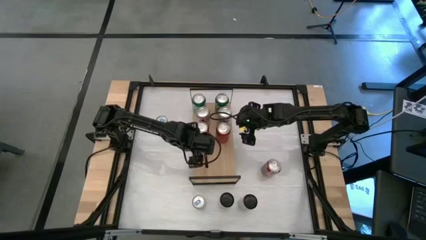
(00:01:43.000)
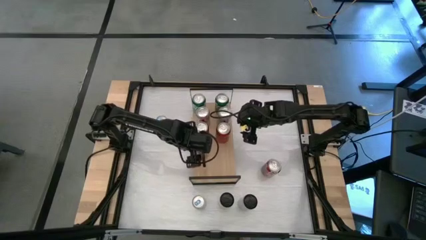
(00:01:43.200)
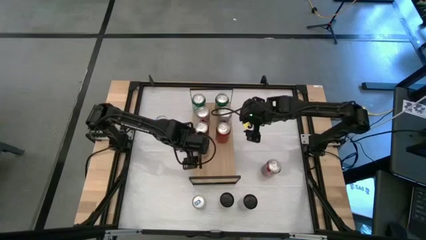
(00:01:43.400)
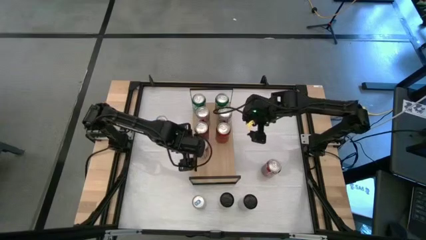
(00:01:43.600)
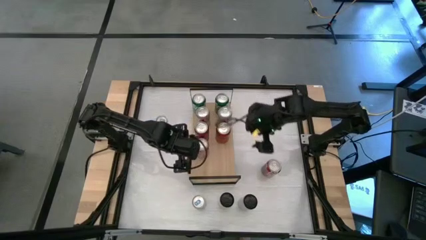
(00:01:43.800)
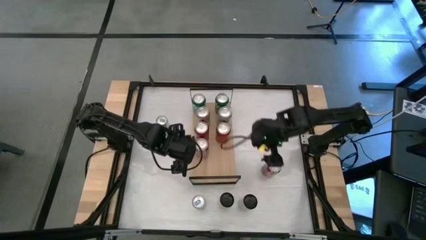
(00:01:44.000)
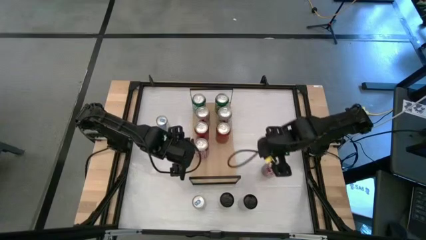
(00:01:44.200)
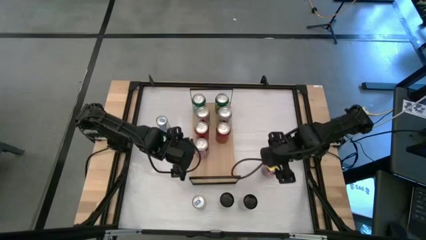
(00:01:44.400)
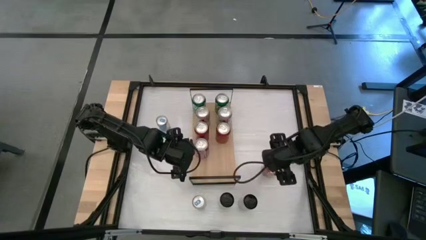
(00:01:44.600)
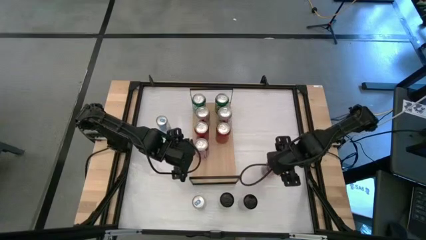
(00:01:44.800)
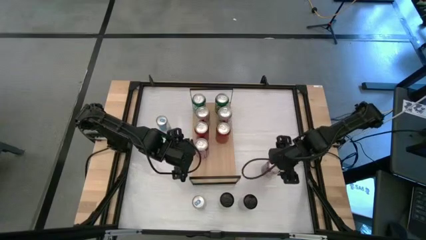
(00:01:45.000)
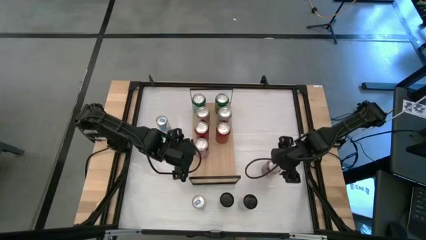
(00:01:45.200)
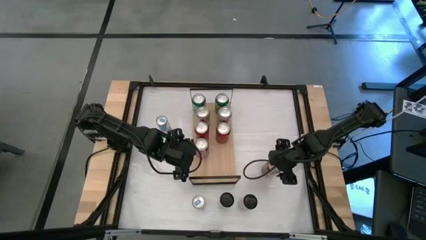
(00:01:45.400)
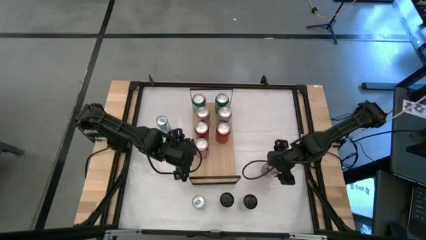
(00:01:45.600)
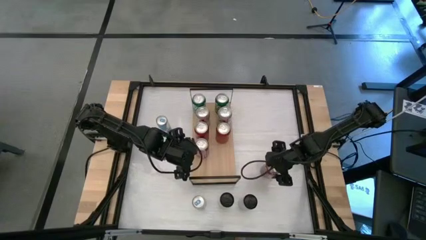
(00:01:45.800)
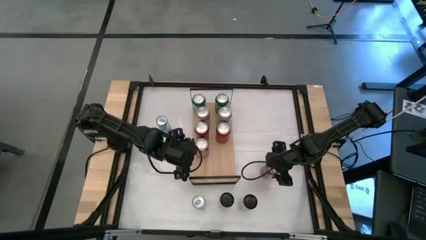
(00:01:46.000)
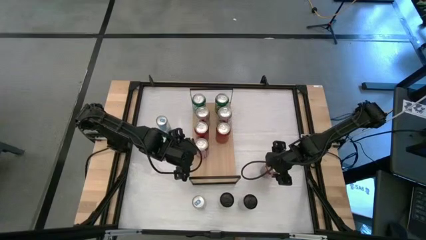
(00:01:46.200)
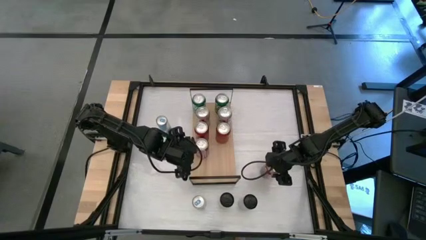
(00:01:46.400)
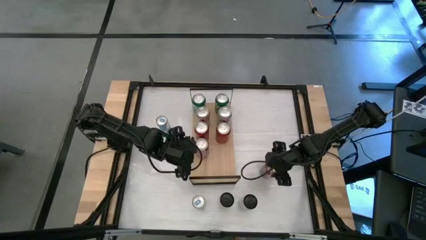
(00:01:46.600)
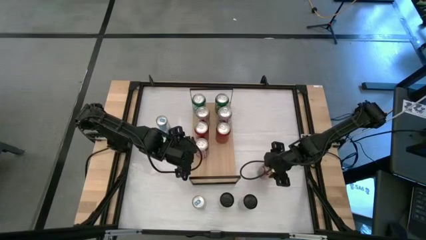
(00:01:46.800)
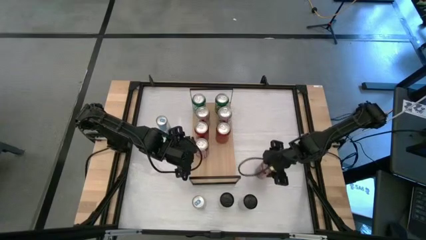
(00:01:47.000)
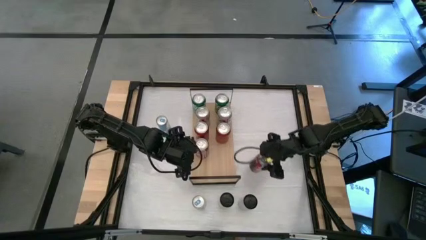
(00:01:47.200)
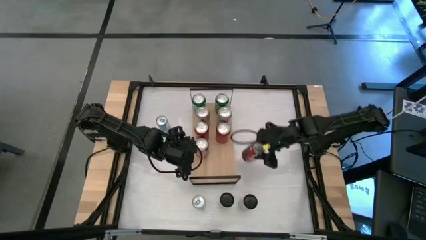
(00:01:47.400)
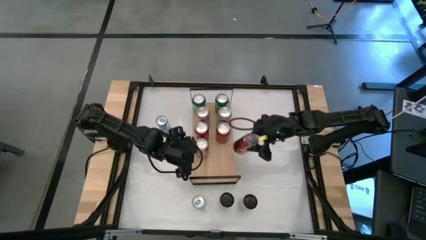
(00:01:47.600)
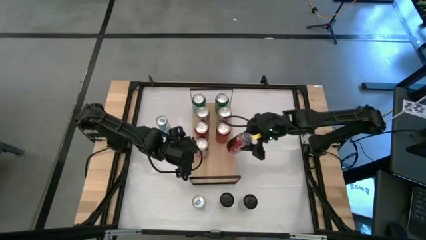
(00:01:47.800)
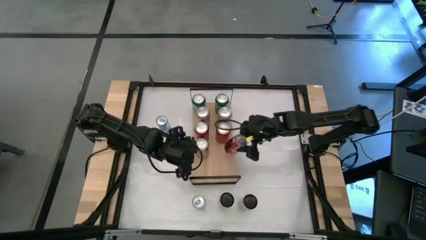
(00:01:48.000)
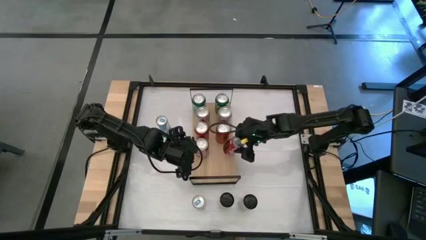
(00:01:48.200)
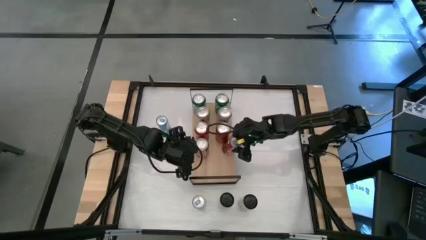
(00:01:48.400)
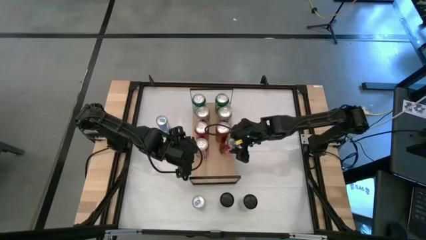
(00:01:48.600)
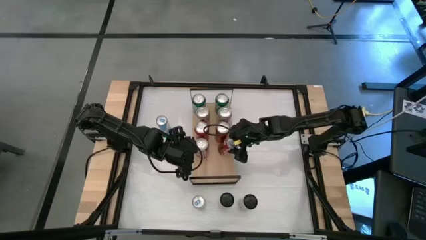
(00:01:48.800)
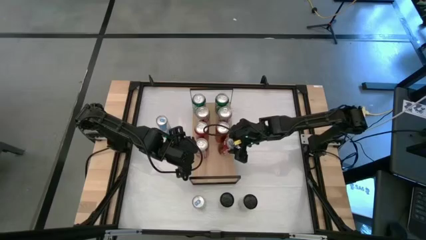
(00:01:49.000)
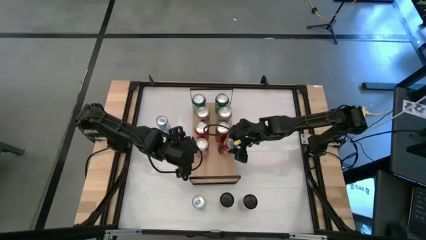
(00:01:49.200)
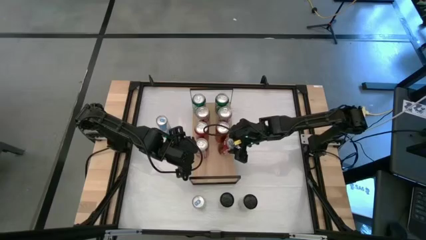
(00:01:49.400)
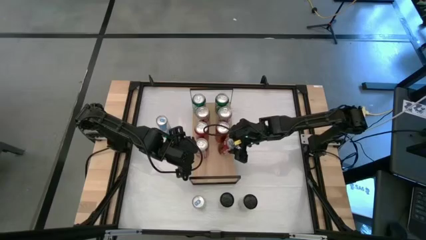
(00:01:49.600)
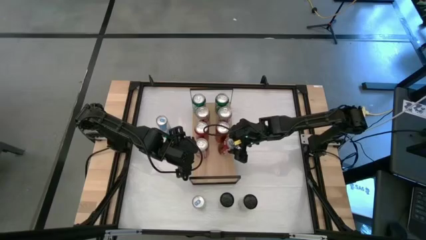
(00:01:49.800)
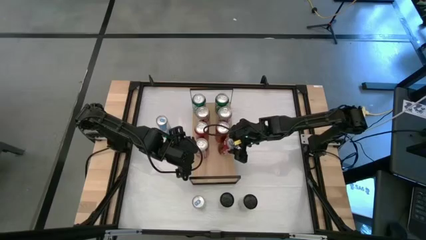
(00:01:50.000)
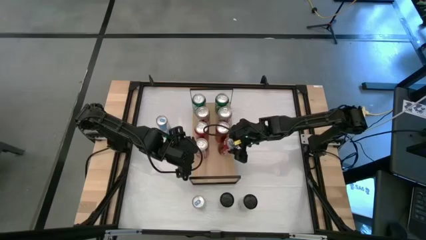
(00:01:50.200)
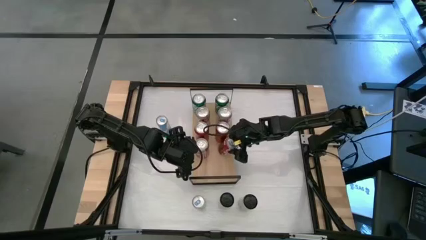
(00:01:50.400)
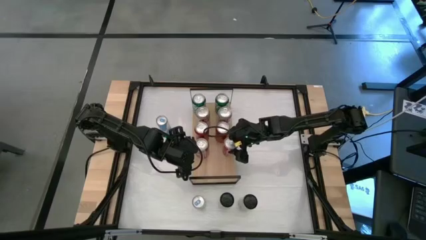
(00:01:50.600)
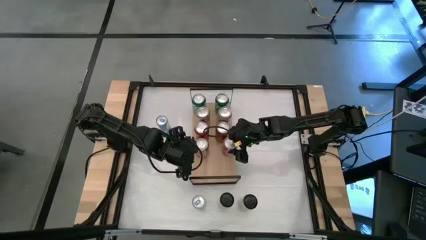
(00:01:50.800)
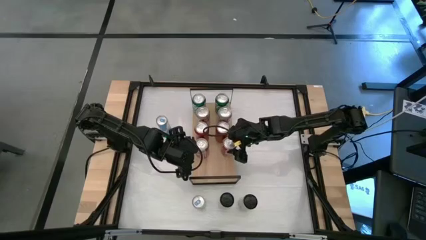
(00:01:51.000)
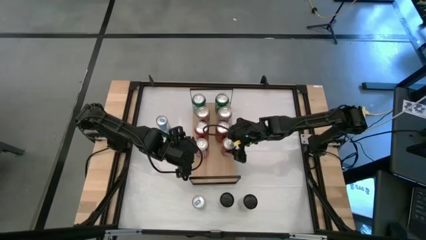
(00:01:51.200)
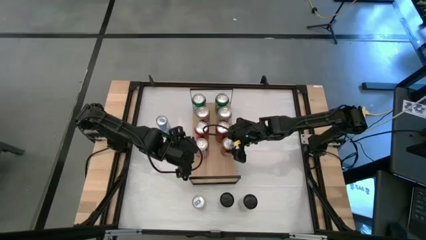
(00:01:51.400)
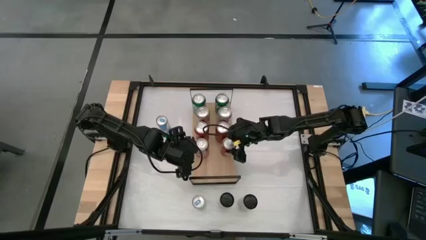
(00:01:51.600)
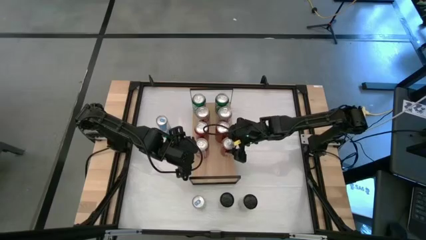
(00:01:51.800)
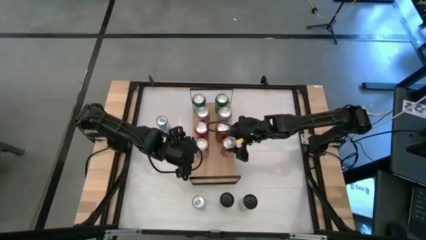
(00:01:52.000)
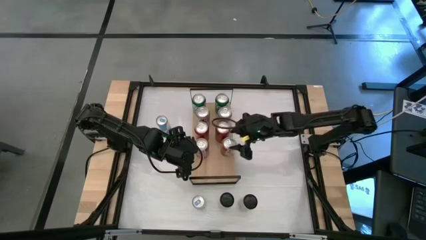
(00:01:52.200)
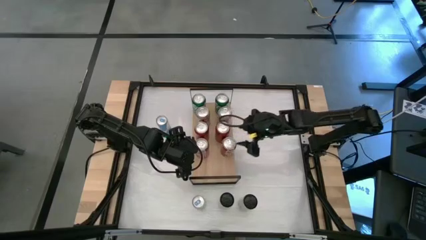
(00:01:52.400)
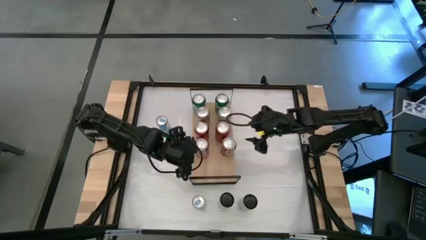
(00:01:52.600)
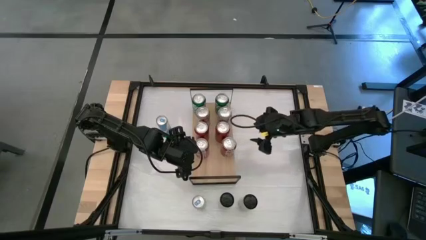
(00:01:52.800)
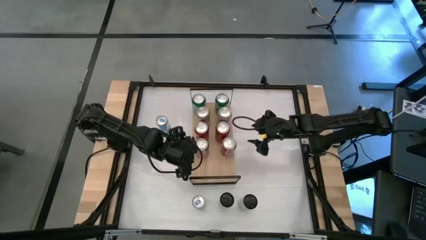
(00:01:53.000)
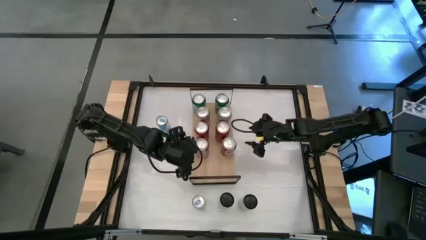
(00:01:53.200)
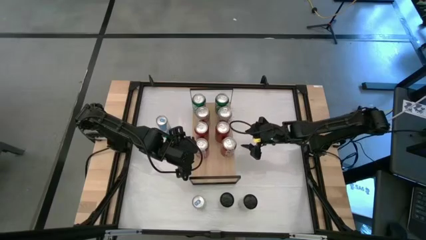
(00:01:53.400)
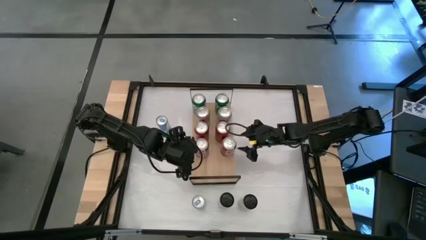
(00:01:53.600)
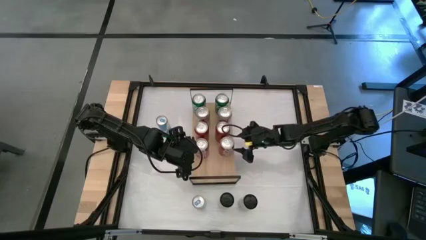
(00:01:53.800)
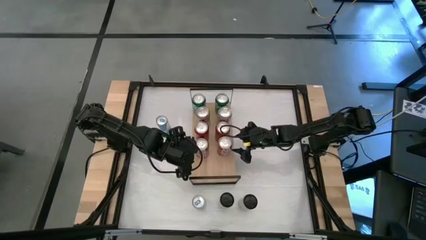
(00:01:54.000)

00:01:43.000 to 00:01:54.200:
Task: Place canned beverage on shelf
Put the white soda can on the shelf aligned with the other white soda can

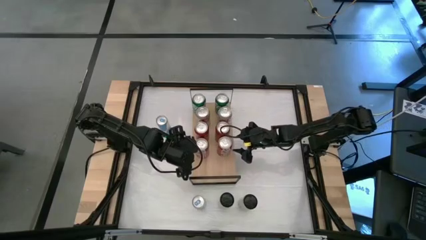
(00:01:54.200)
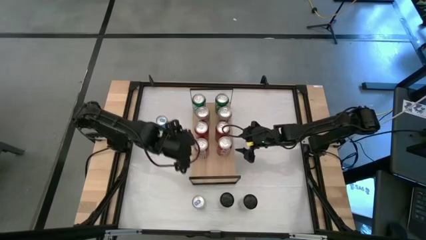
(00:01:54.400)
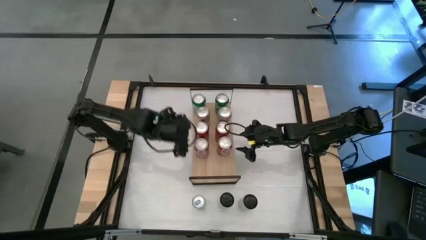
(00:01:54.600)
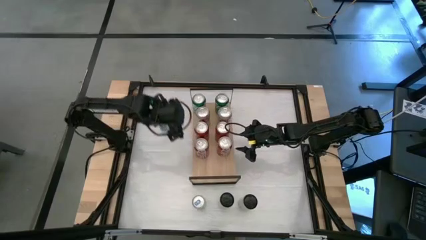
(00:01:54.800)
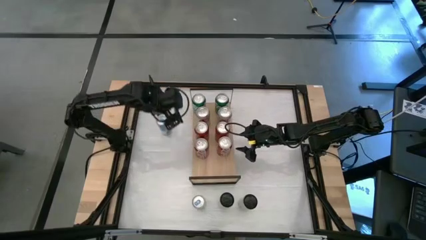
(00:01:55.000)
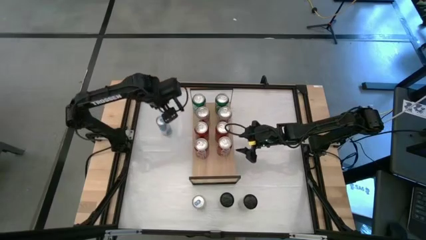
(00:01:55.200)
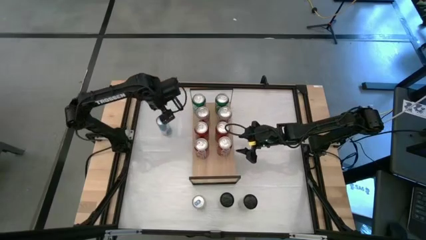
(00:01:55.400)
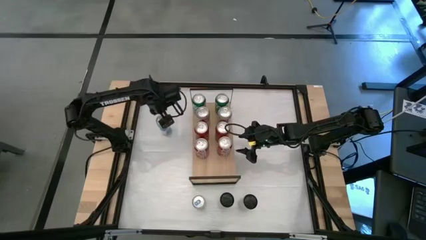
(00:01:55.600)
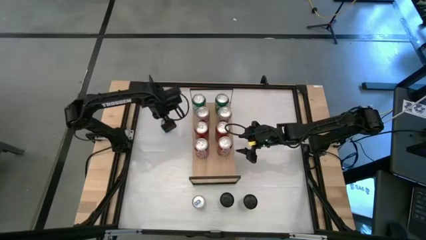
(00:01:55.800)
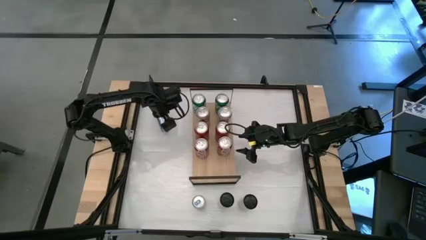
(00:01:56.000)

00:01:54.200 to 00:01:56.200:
Put the top blue soda can on the shelf
